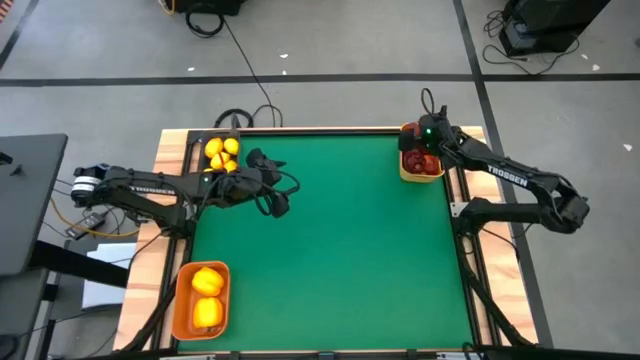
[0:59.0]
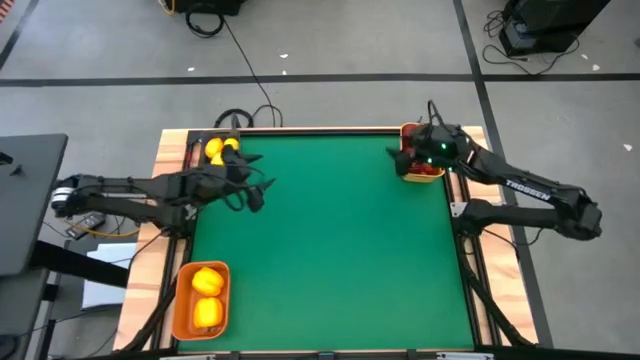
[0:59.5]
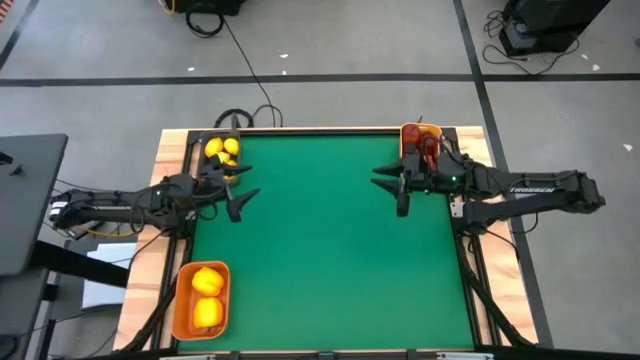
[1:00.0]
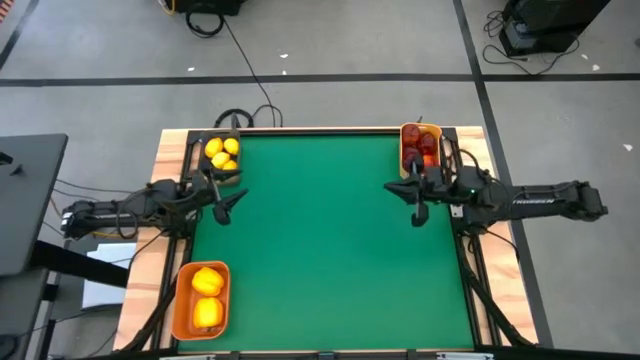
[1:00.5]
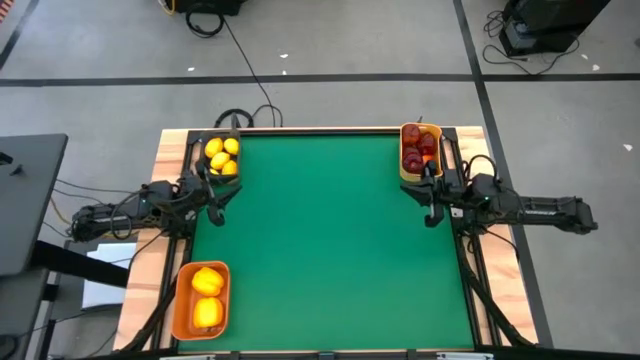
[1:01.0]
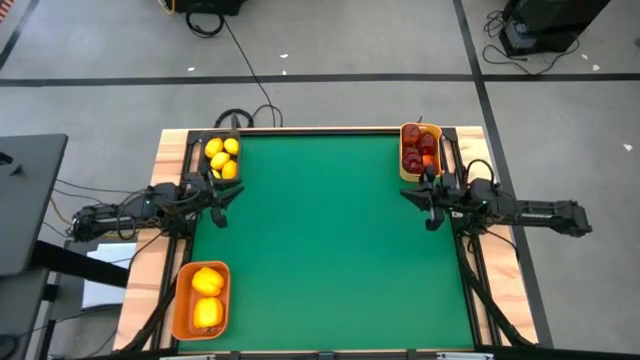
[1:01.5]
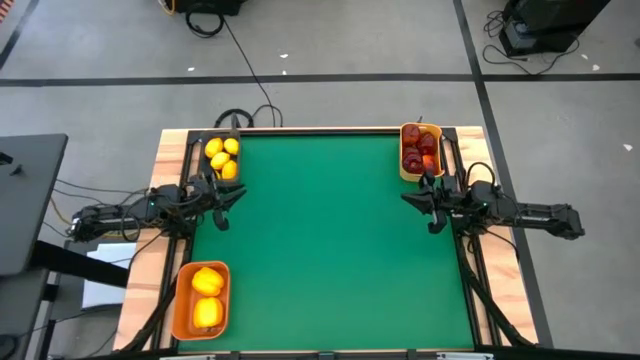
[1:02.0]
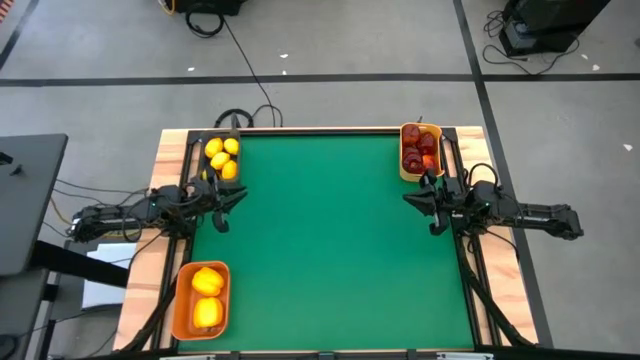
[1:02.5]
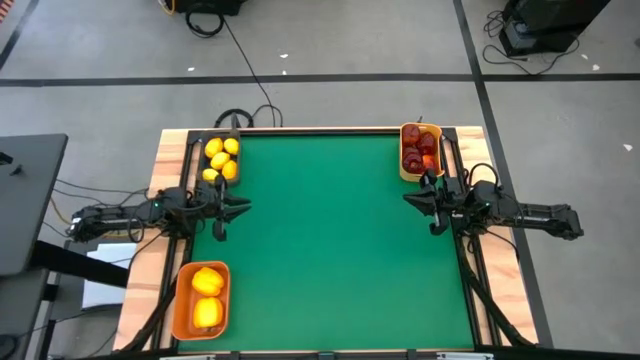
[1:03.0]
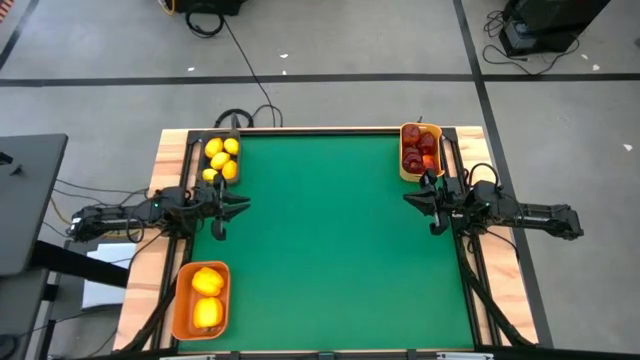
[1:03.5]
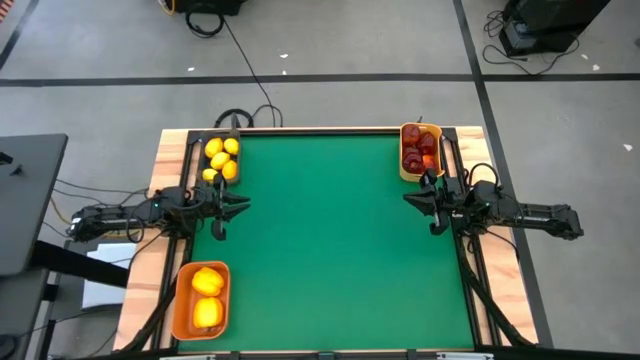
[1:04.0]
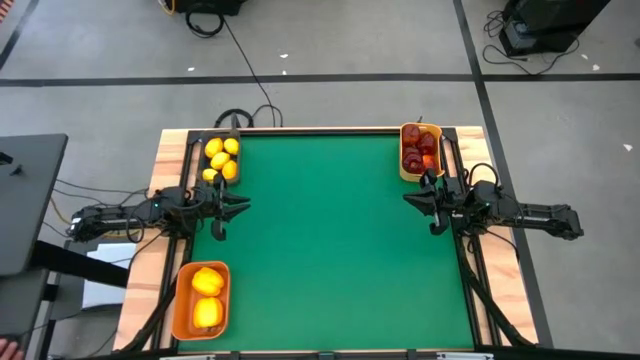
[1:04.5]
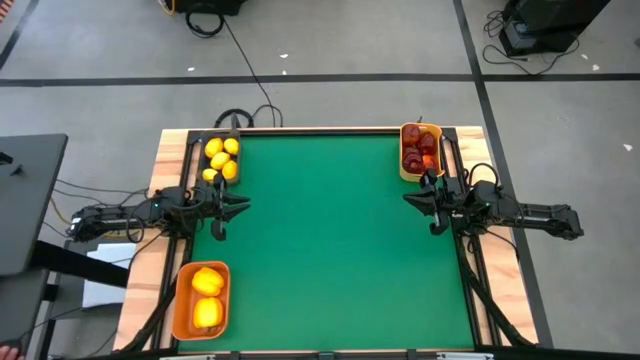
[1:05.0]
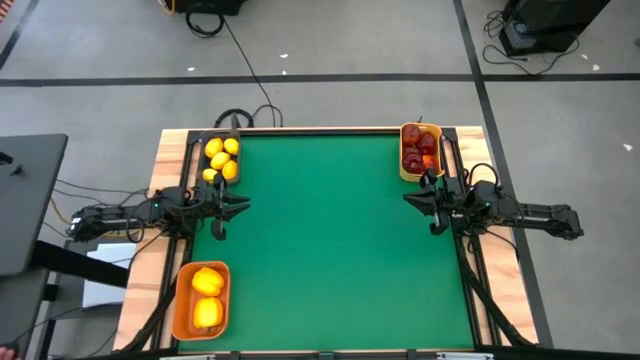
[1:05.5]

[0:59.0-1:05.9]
Task: Sort produce into baskets
Return to Home Position

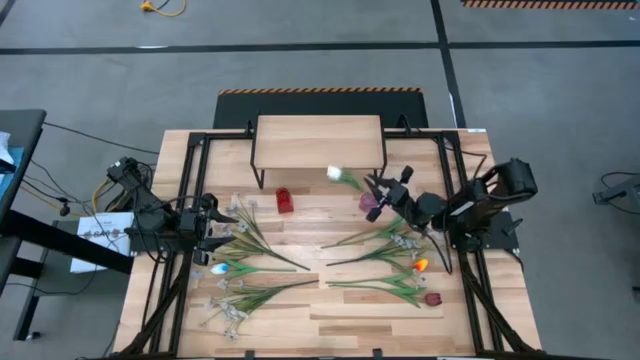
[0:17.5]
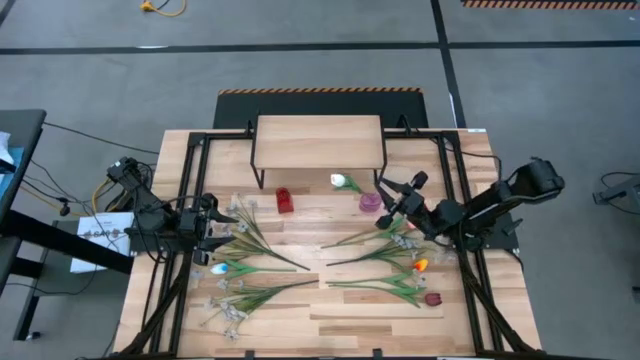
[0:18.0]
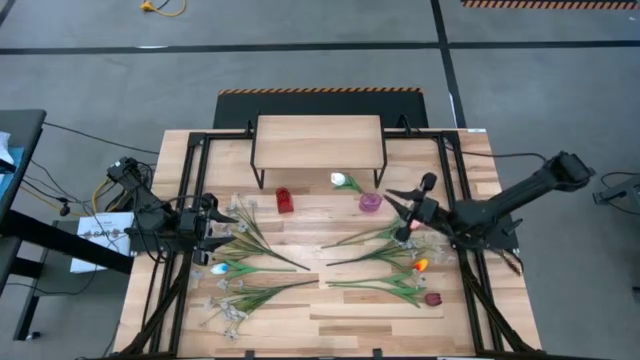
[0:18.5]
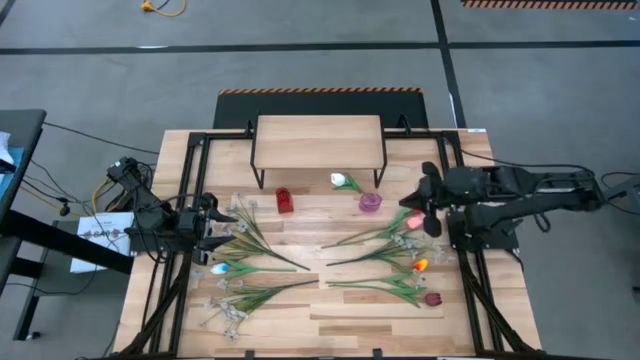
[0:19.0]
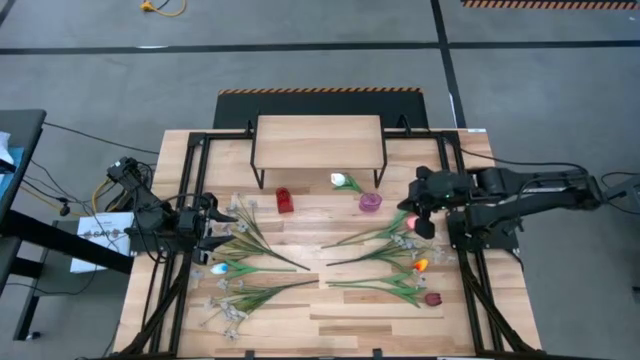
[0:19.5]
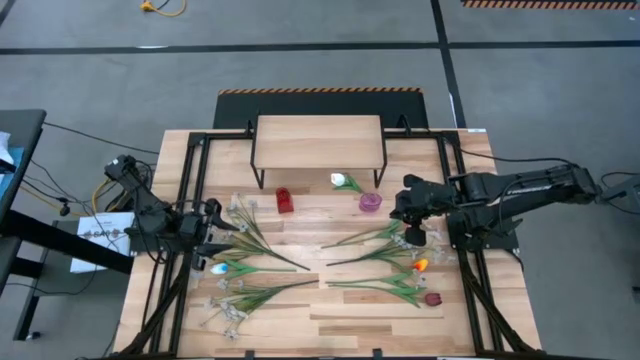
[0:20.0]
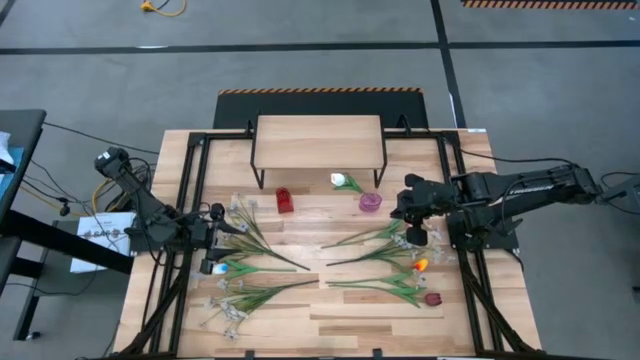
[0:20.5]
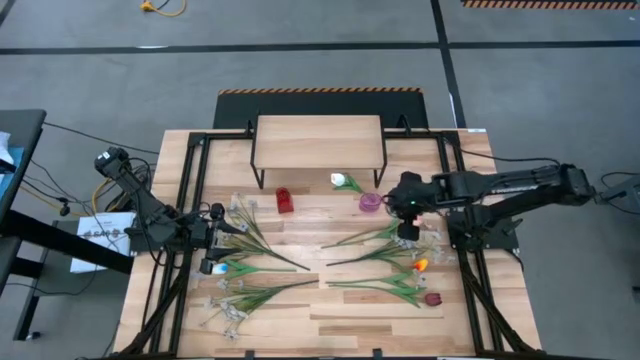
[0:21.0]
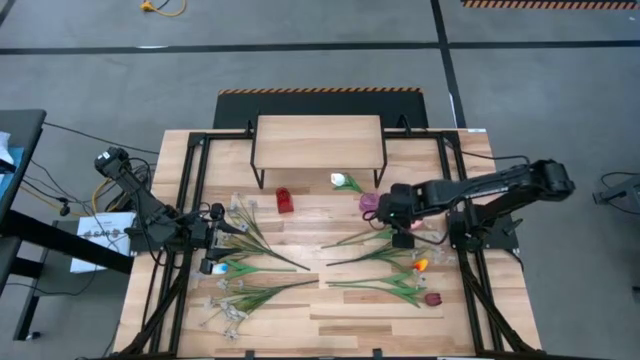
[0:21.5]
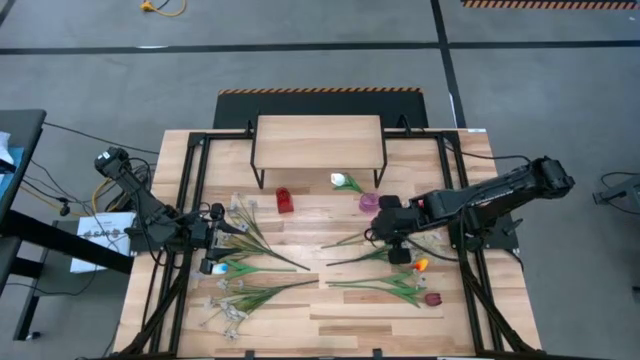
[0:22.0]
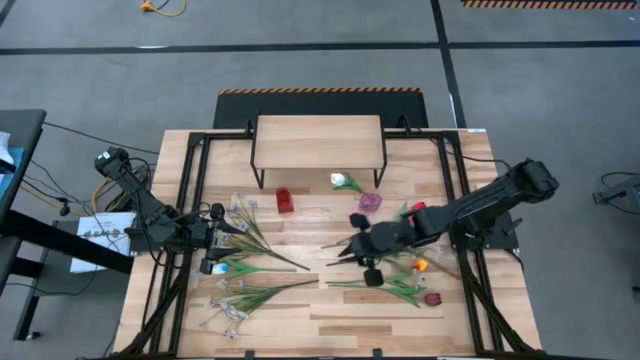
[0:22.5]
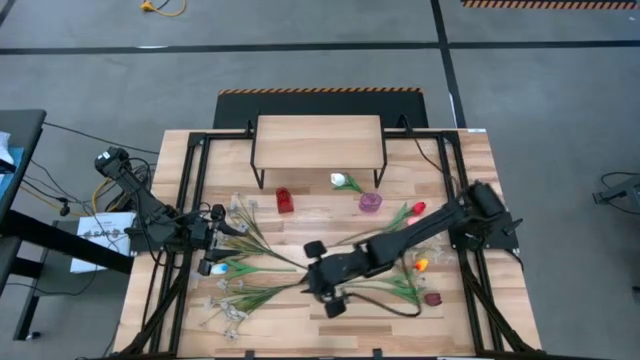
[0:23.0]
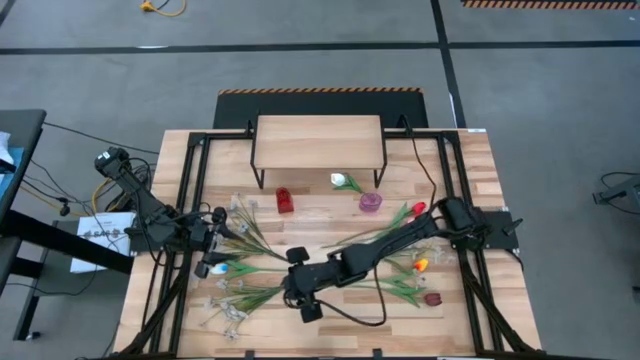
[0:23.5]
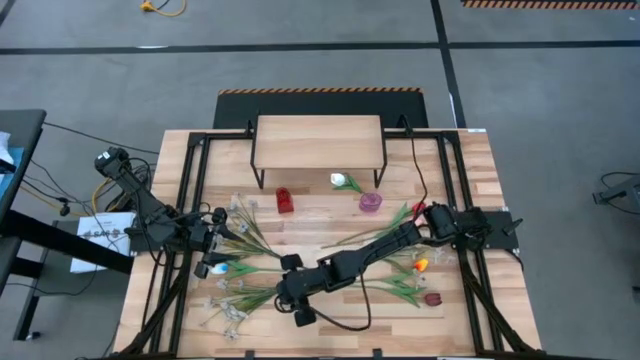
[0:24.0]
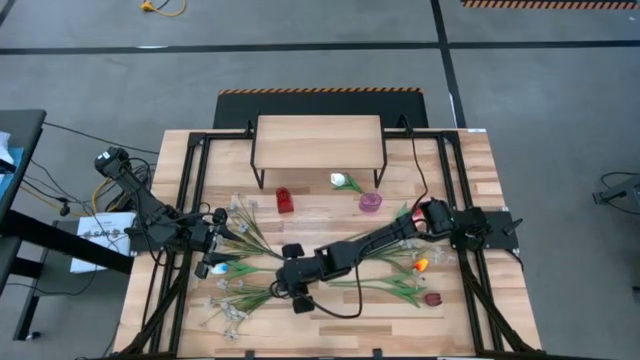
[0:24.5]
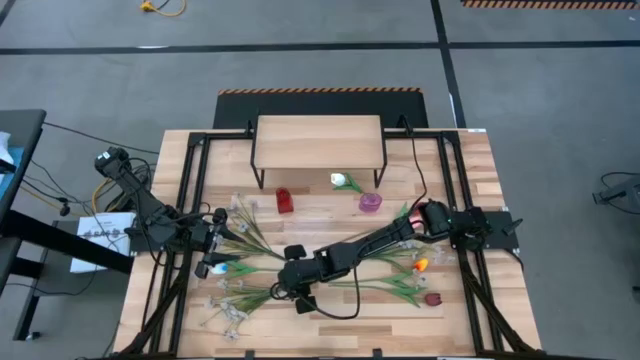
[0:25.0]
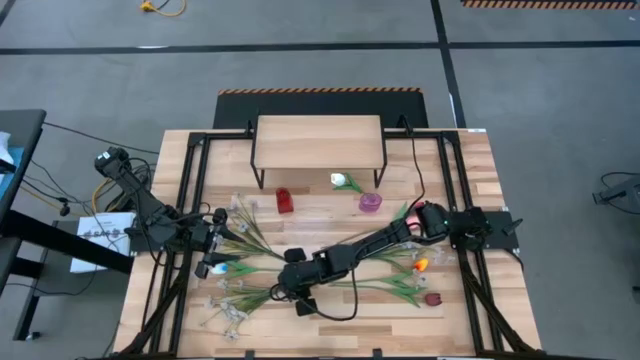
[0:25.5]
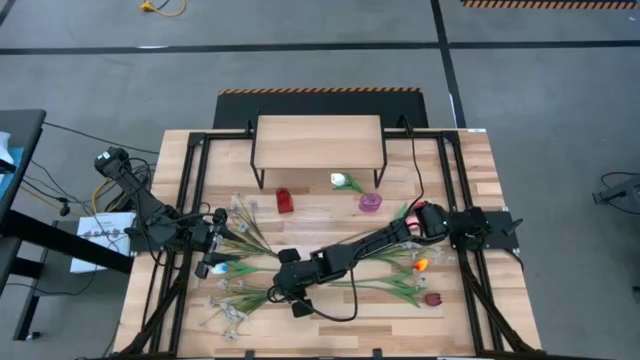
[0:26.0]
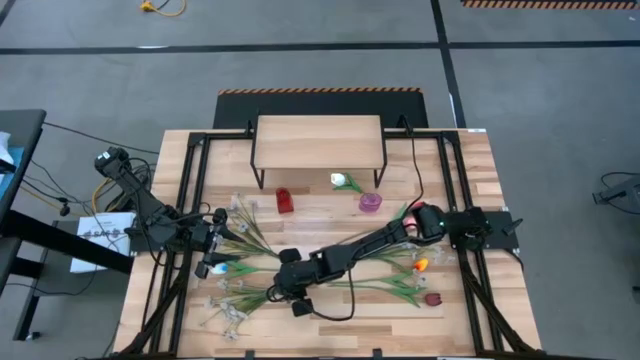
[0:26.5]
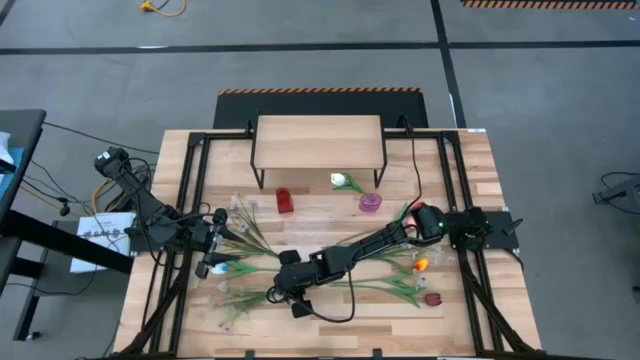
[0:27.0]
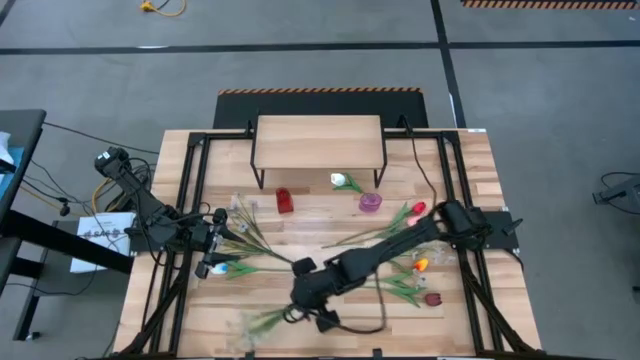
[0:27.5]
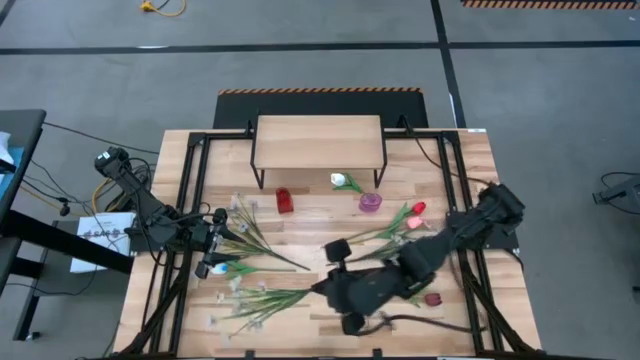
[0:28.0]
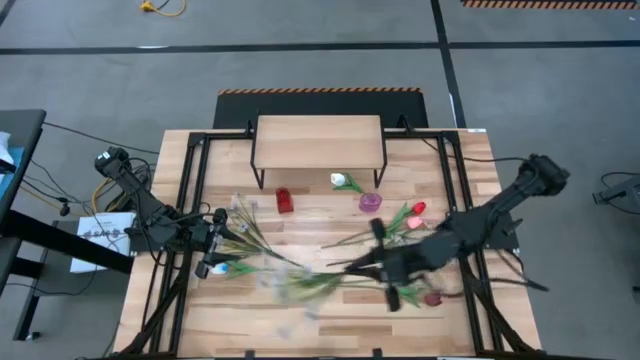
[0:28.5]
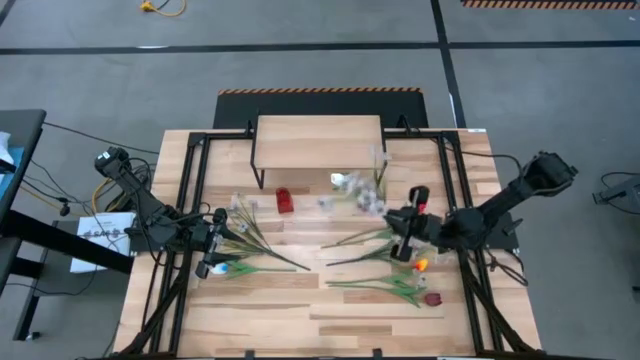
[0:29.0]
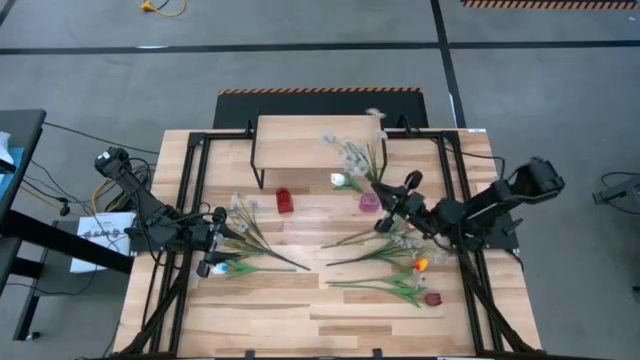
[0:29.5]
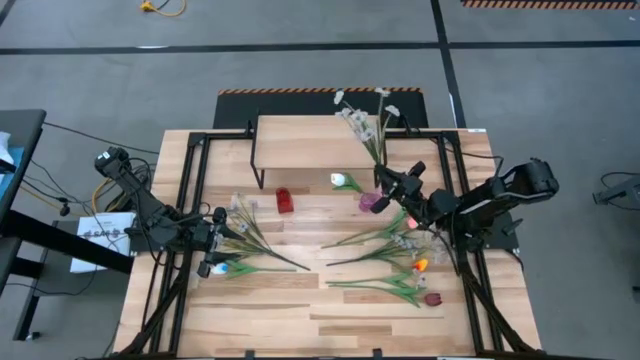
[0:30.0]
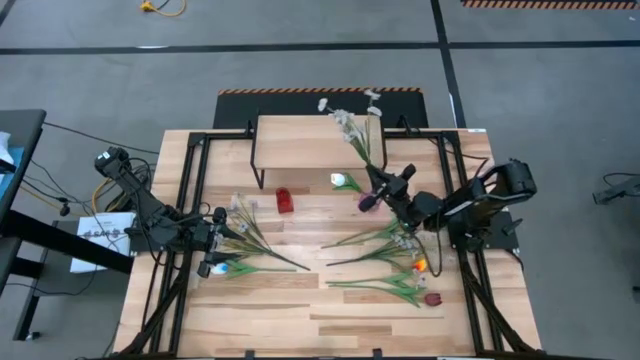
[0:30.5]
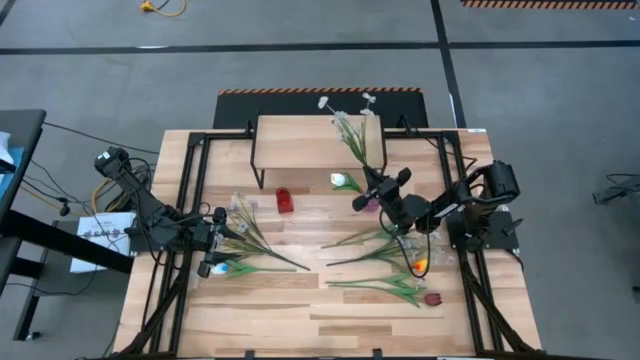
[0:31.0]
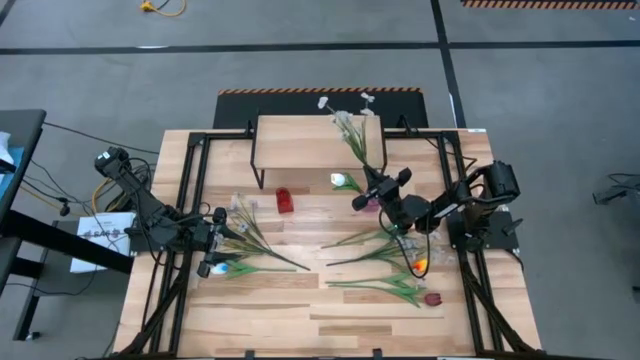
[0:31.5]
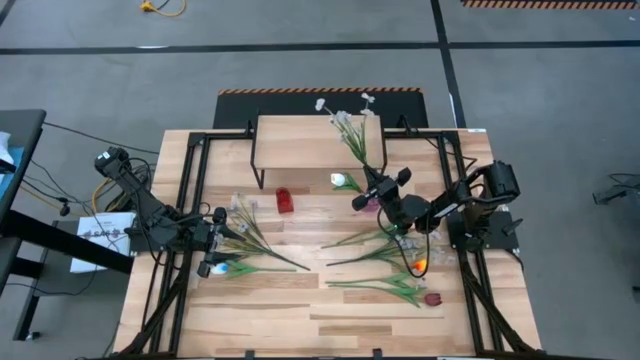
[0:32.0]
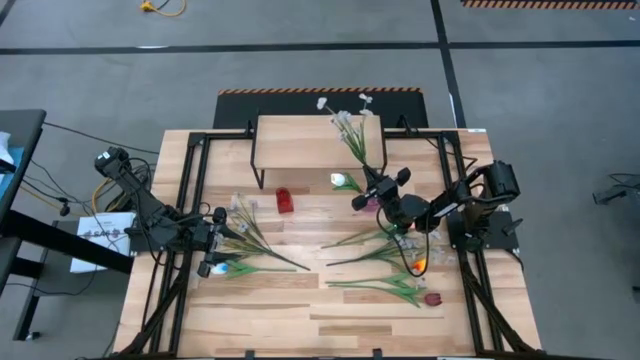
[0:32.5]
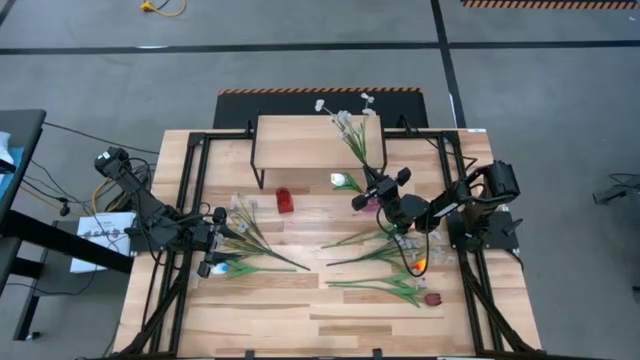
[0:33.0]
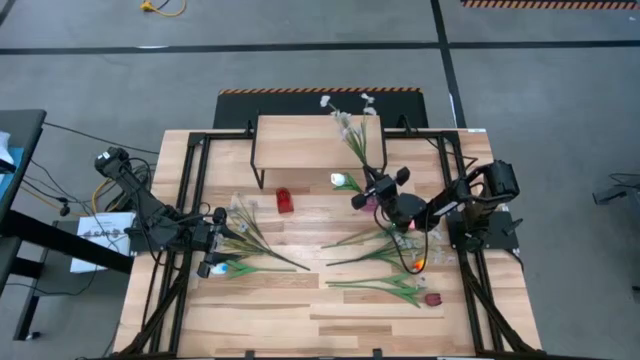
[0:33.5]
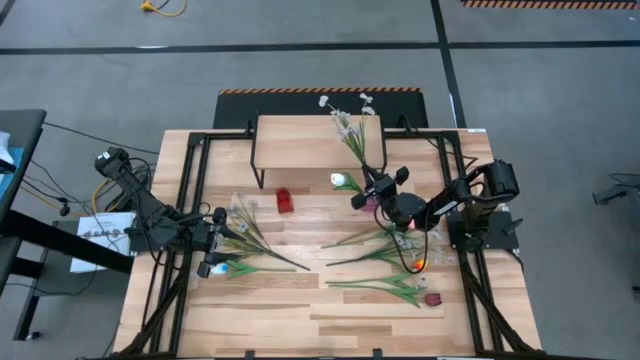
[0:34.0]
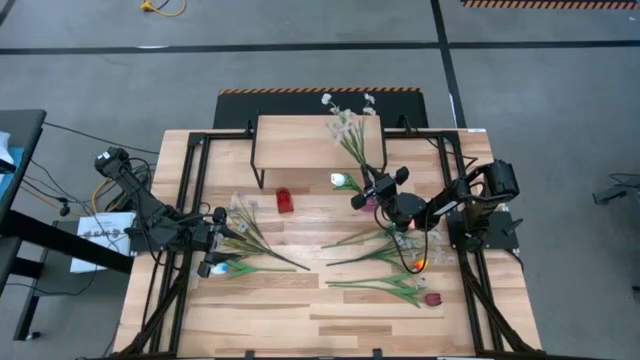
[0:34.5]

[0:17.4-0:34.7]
Task: Pick and place flowers into a vace then onto a shelf
Put the bottom white flowers into the pink vase
